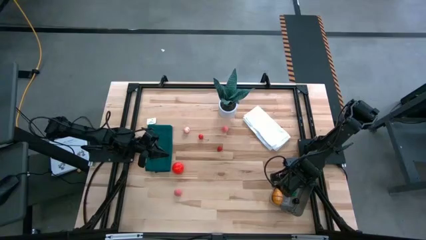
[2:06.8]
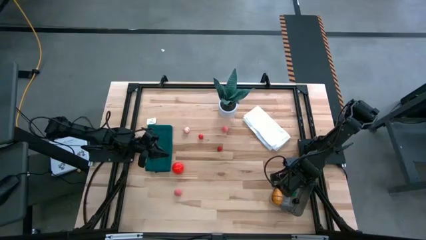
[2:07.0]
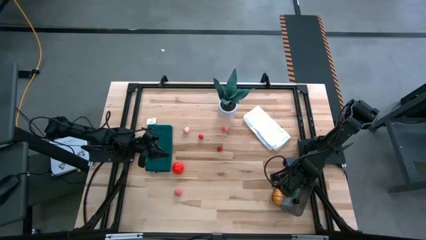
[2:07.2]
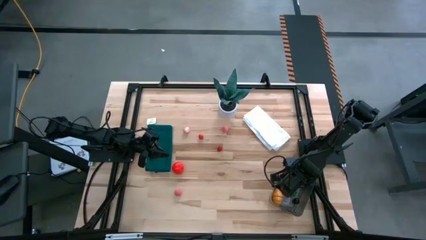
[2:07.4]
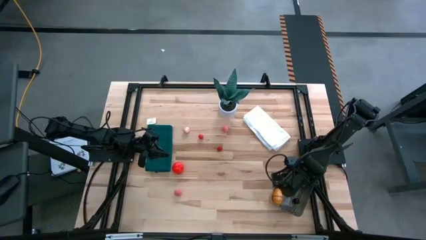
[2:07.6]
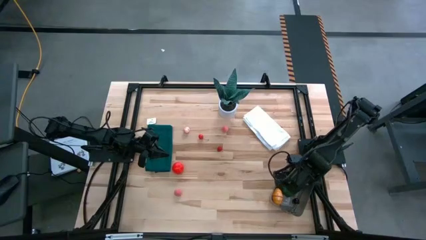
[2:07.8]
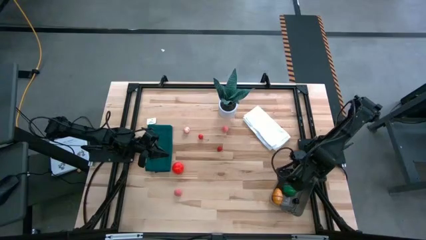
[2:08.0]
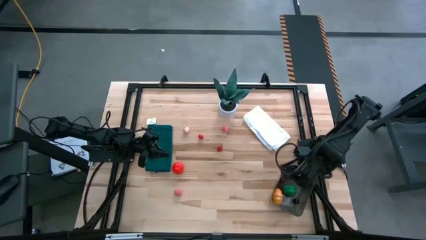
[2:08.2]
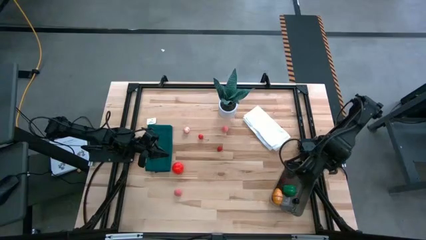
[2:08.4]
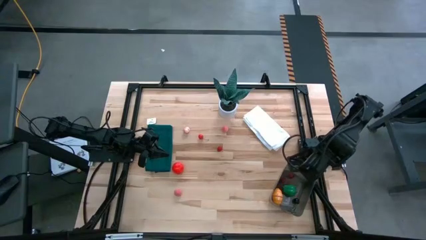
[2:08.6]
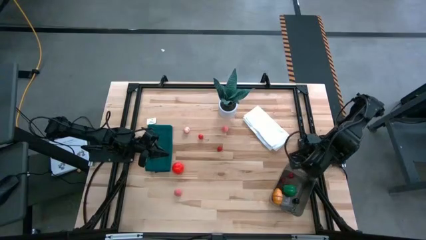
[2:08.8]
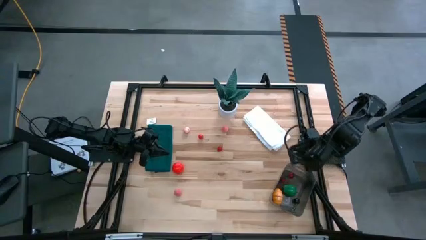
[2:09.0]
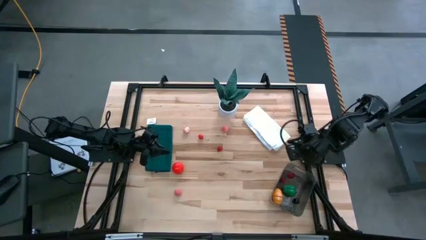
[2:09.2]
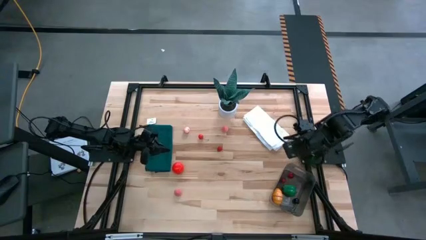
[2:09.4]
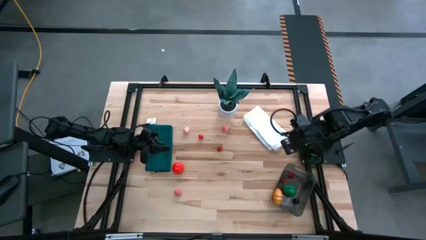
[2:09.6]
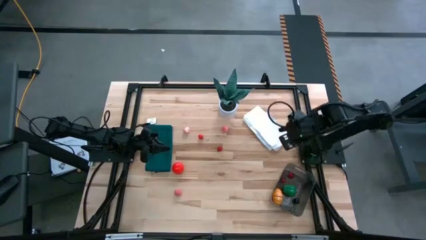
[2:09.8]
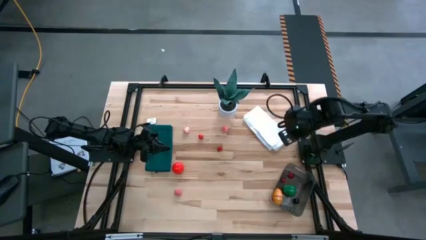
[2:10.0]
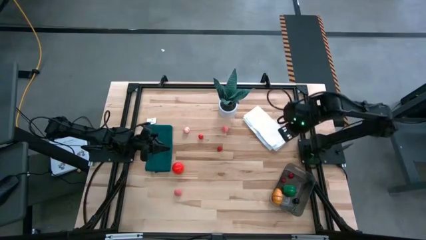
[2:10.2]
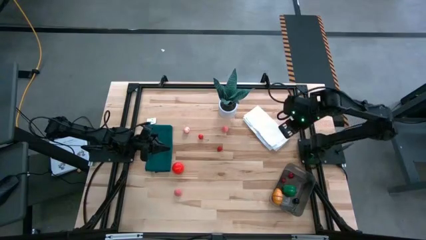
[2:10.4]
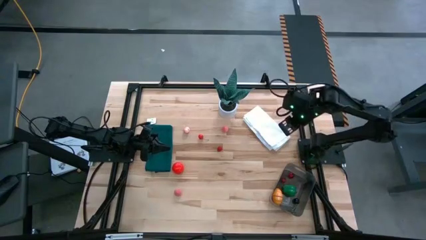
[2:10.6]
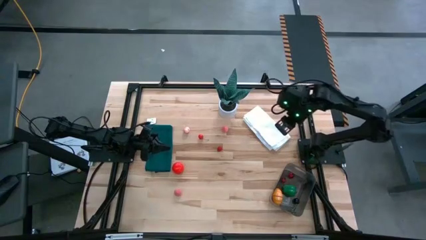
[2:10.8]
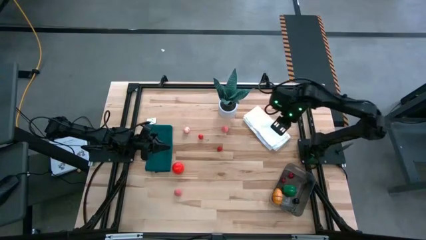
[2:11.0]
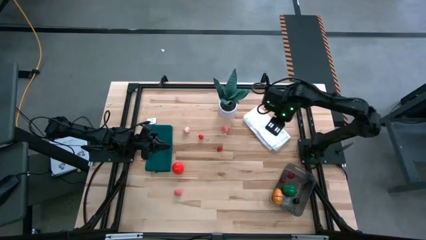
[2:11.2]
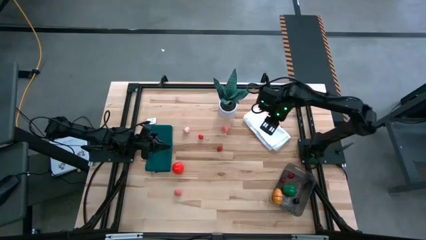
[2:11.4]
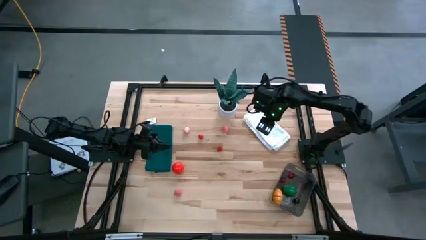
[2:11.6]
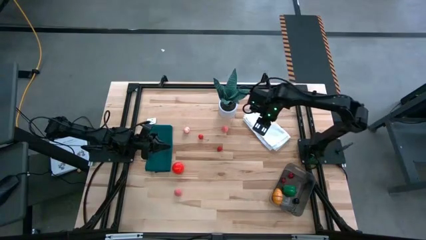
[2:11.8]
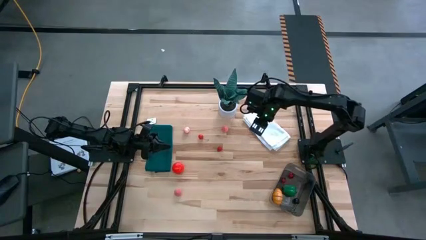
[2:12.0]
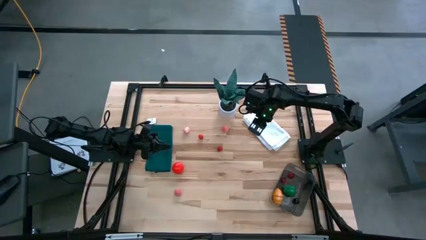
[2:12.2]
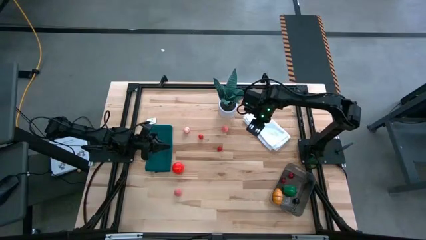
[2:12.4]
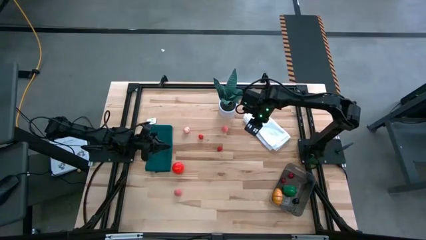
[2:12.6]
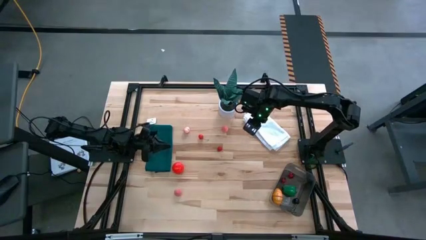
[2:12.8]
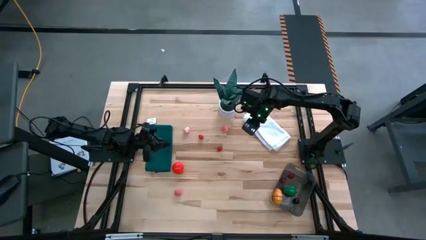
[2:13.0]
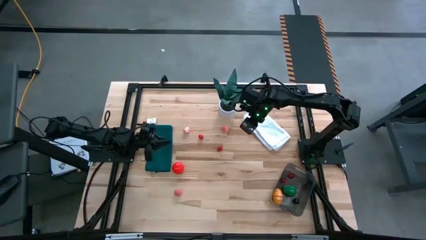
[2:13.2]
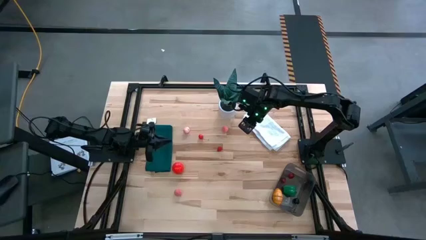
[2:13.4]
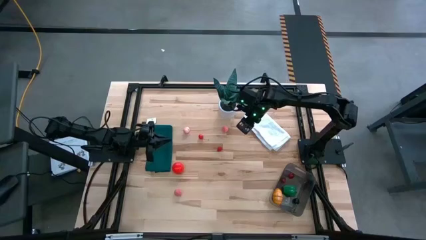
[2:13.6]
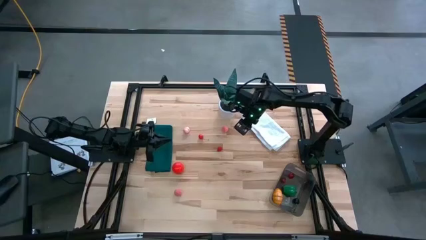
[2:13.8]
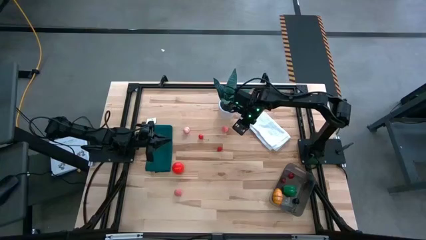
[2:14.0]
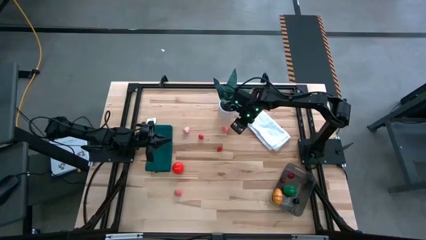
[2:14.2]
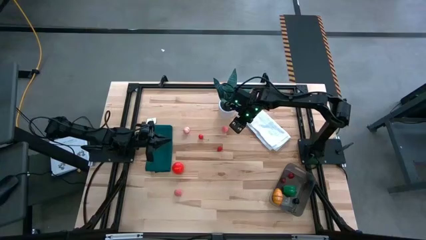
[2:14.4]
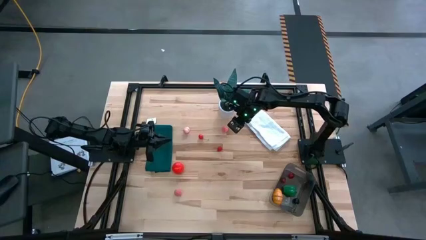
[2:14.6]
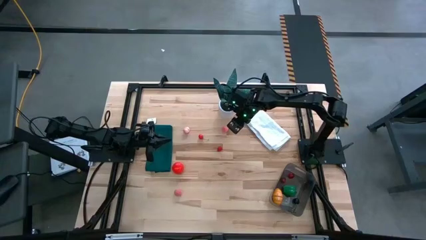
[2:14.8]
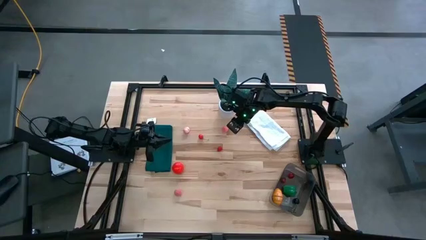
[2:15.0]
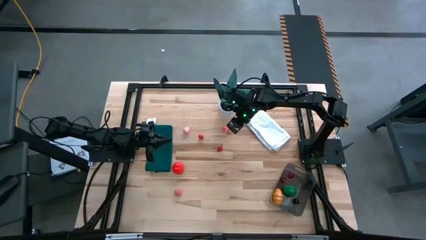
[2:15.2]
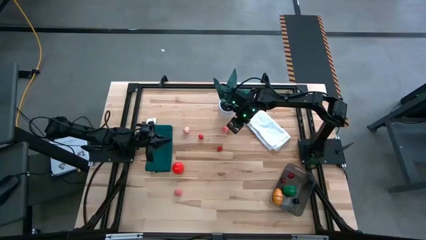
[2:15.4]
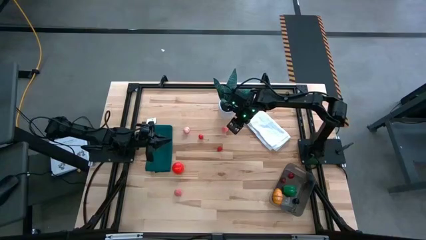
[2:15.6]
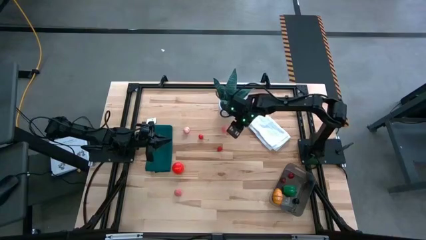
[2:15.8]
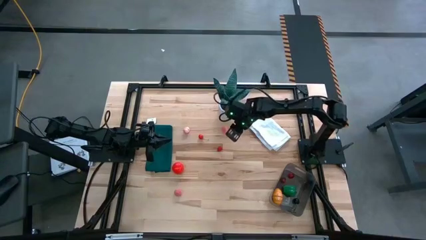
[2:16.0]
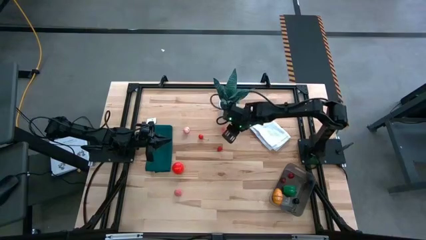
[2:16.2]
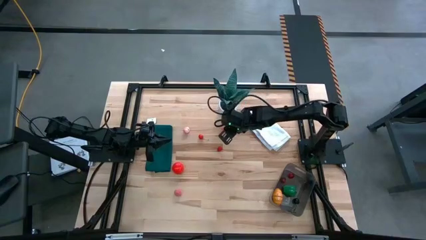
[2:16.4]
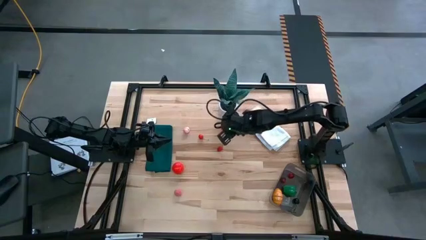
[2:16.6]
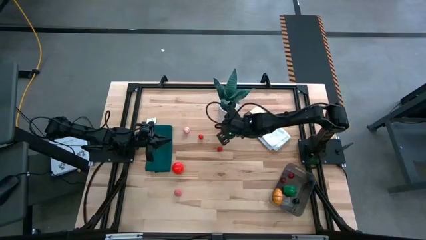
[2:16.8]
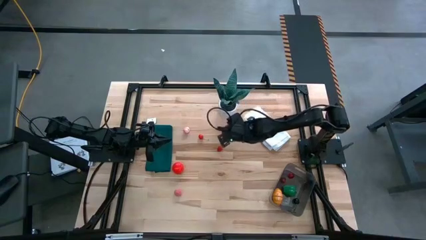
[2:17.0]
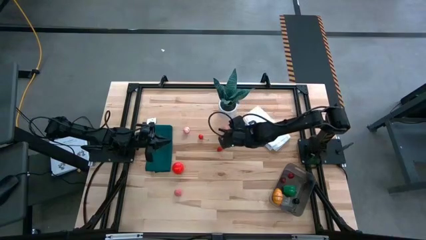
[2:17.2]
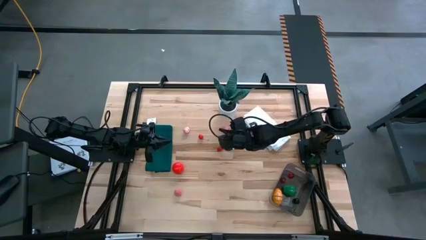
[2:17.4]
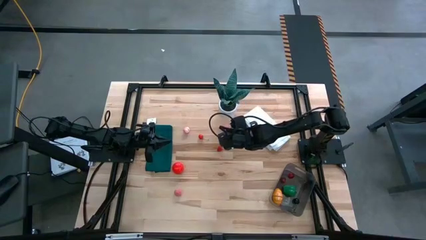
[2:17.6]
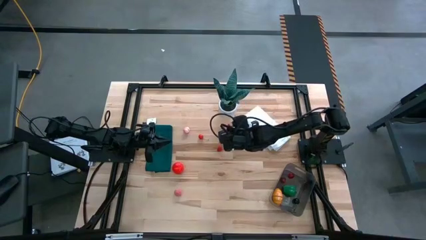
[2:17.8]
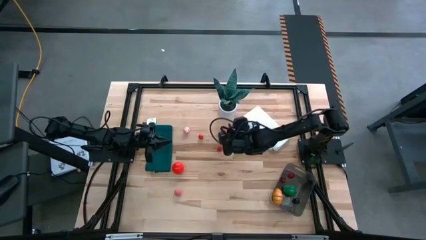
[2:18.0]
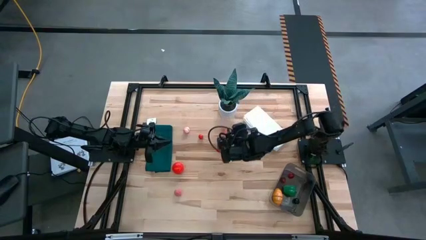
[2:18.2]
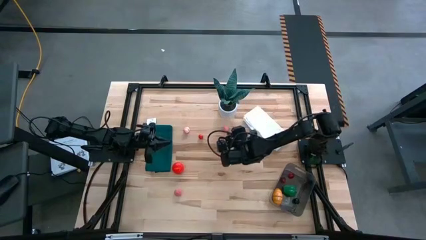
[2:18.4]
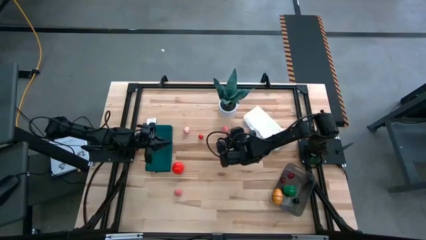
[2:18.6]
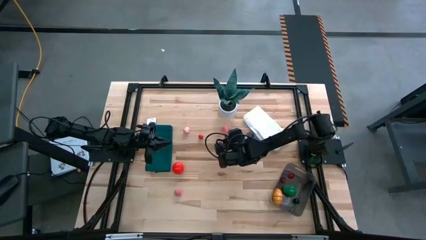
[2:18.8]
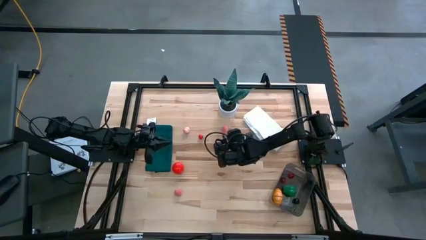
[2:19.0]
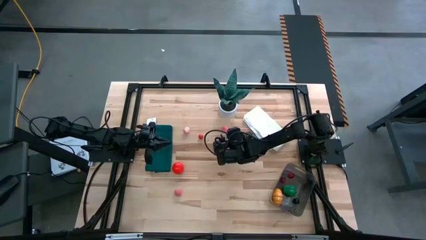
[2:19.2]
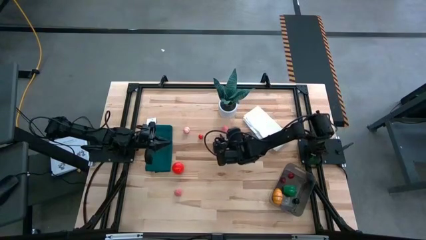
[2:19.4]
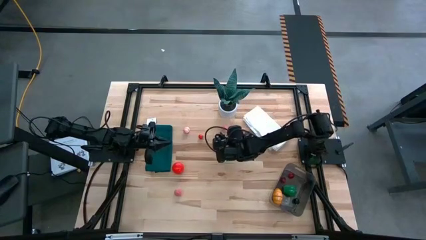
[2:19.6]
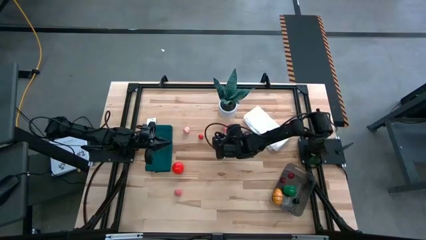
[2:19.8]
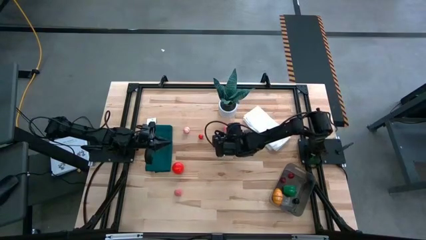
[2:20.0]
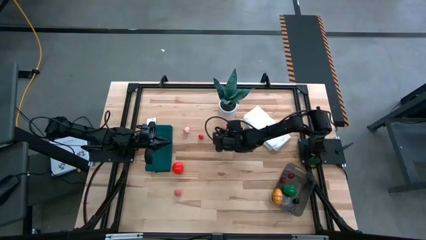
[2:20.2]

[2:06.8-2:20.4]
Task: Pick and placing Produce into tupperware
Put the top right pink peach into the black bin

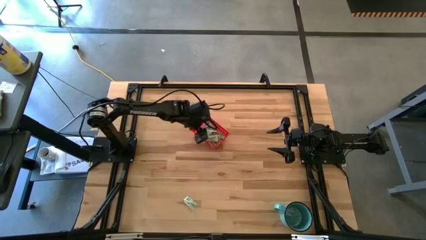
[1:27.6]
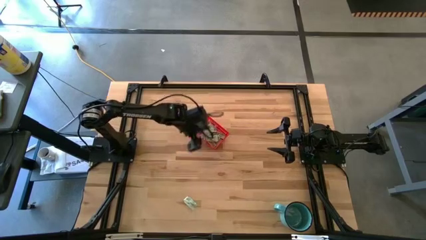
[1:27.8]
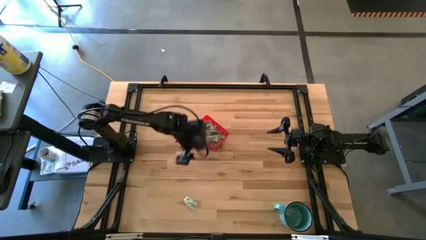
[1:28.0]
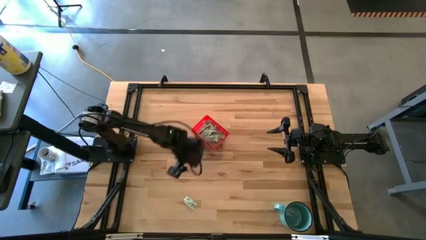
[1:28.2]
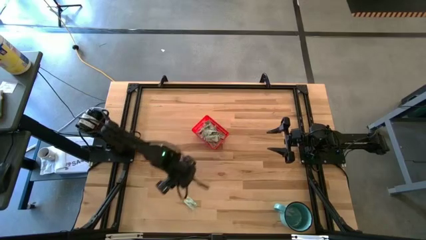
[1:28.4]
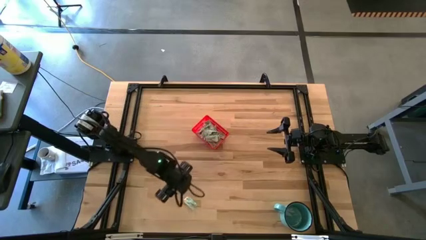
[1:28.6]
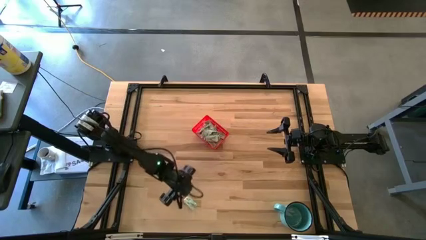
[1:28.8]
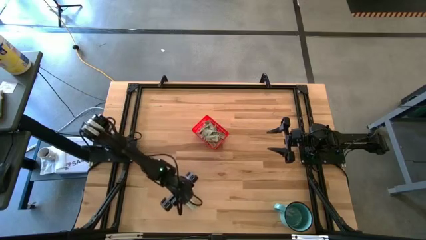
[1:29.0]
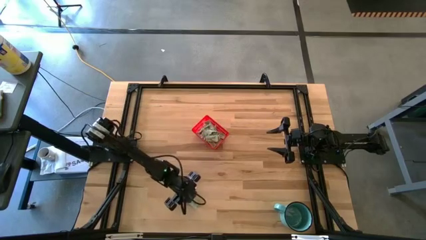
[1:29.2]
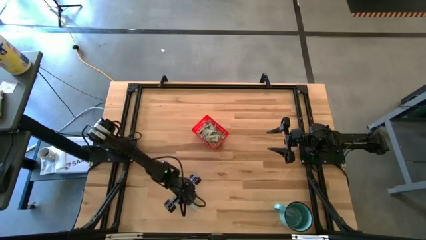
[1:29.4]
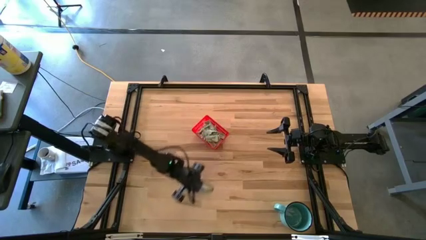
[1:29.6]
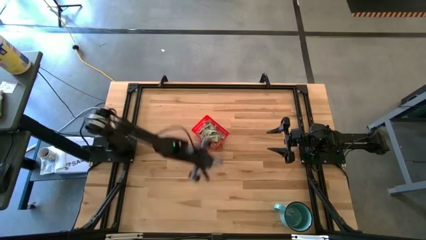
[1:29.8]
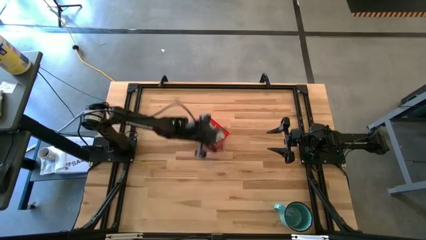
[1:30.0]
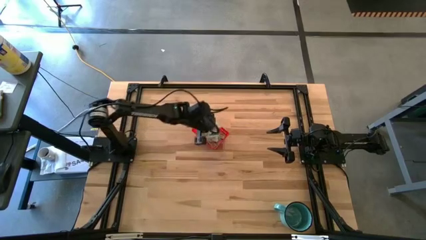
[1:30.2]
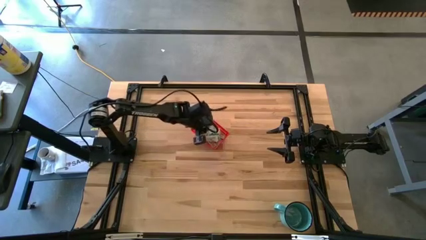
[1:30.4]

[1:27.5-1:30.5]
Task: Pick and place Stevia / Truvia into bins
Put the stevia packet into the red basket
